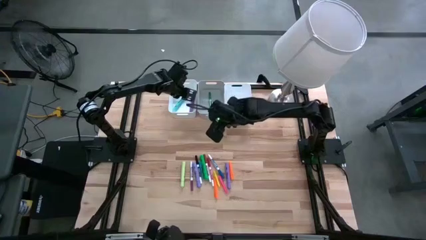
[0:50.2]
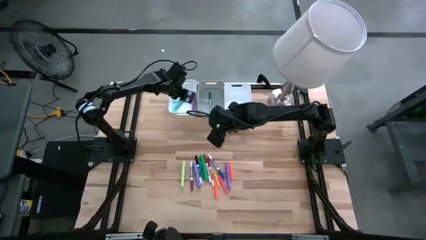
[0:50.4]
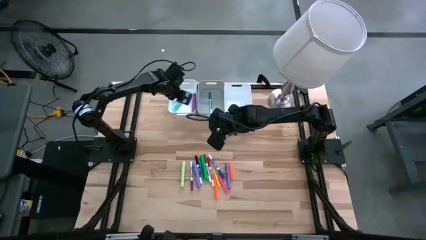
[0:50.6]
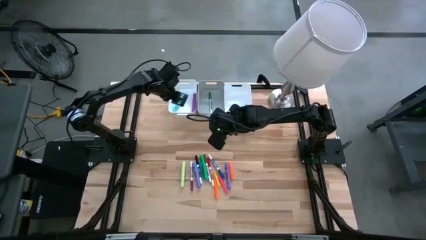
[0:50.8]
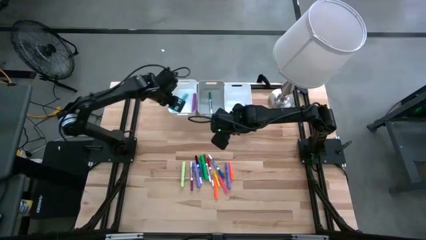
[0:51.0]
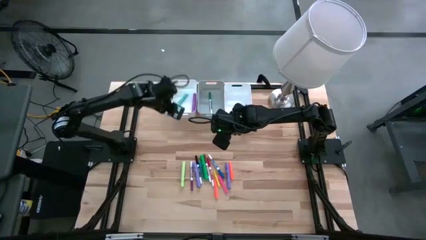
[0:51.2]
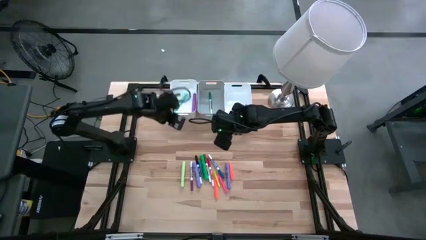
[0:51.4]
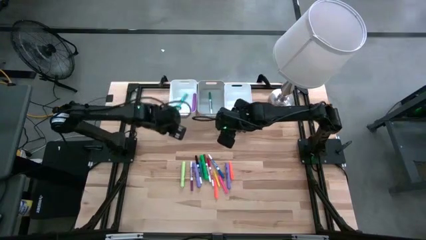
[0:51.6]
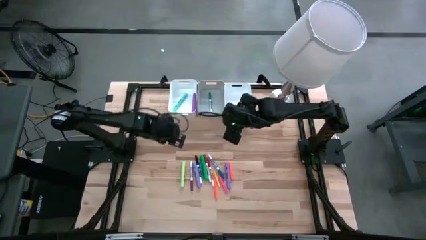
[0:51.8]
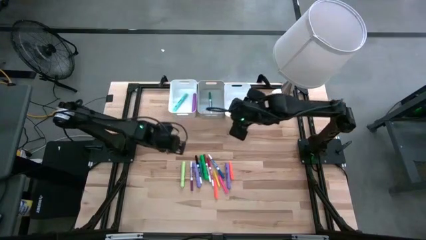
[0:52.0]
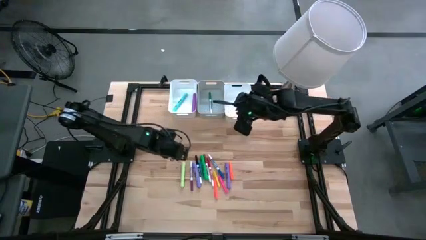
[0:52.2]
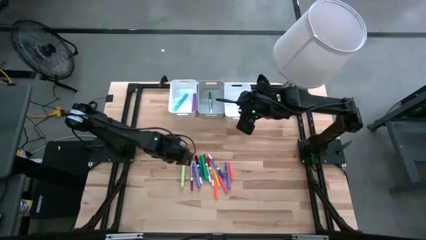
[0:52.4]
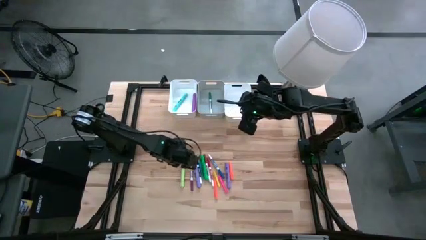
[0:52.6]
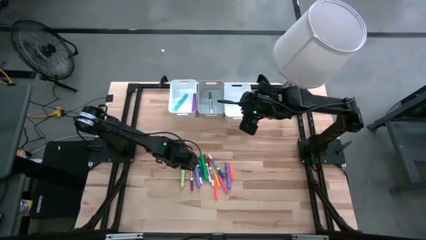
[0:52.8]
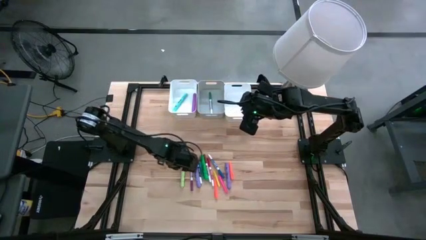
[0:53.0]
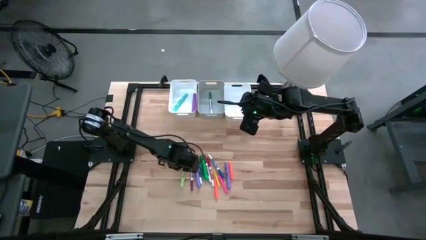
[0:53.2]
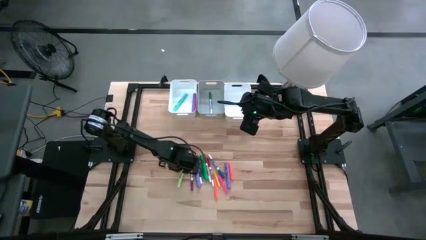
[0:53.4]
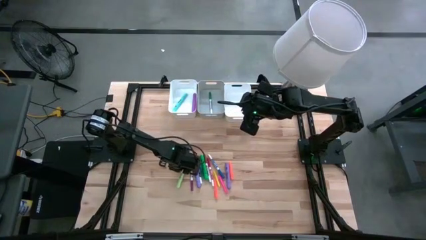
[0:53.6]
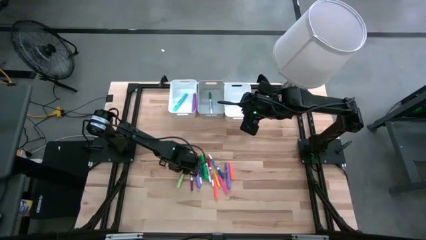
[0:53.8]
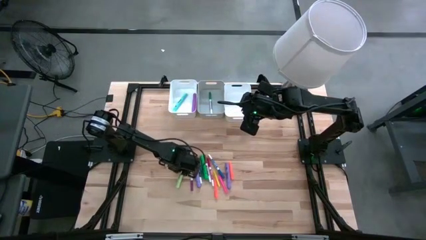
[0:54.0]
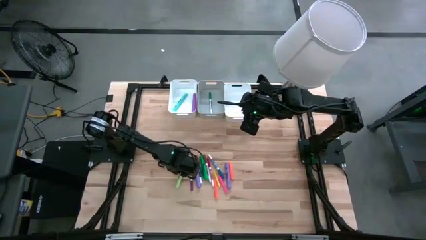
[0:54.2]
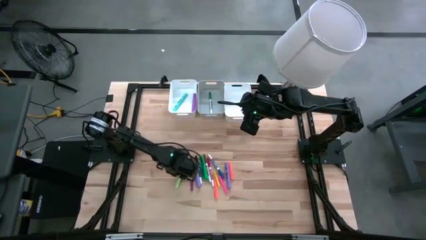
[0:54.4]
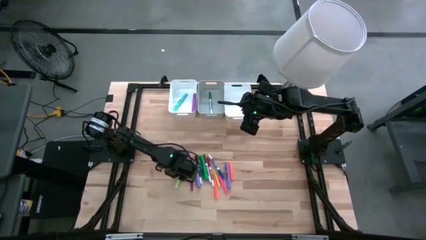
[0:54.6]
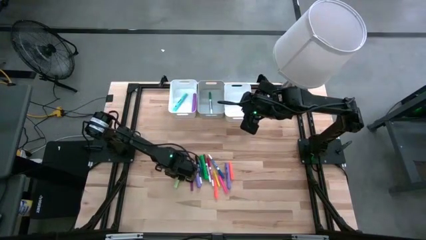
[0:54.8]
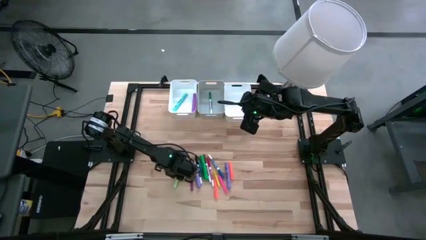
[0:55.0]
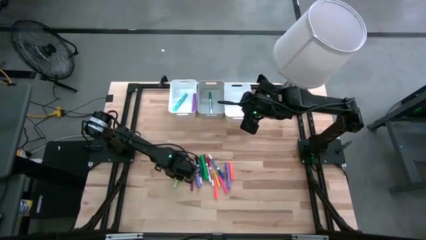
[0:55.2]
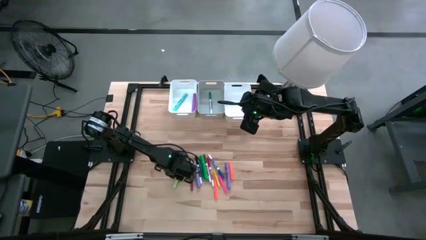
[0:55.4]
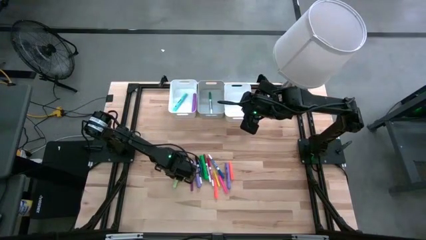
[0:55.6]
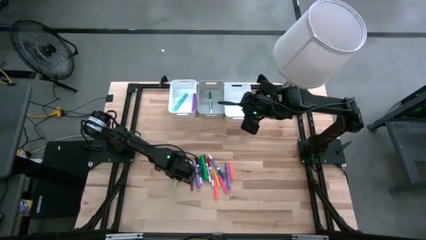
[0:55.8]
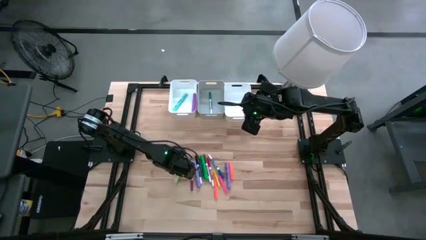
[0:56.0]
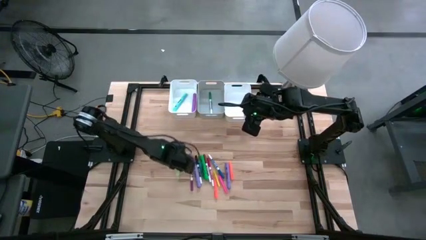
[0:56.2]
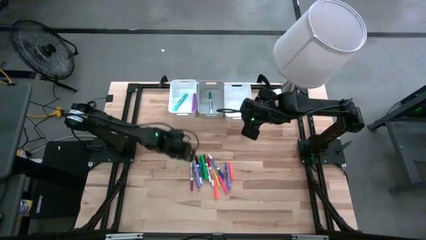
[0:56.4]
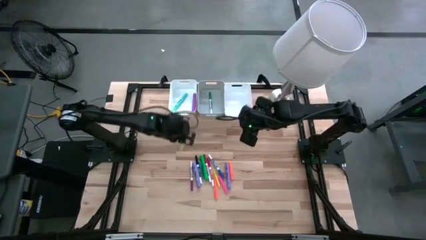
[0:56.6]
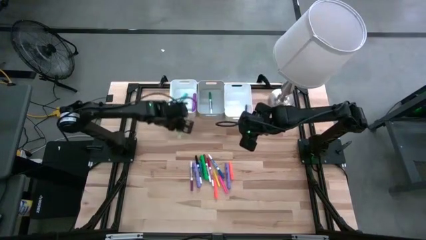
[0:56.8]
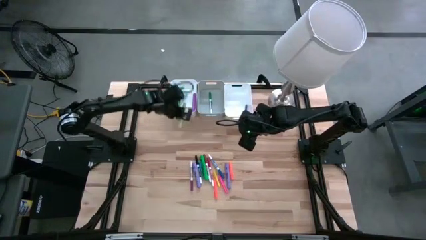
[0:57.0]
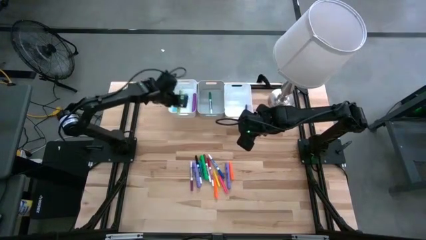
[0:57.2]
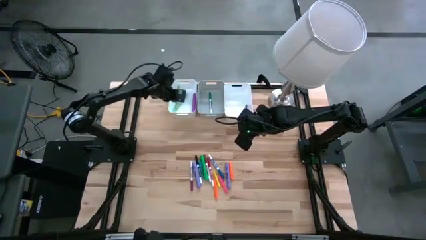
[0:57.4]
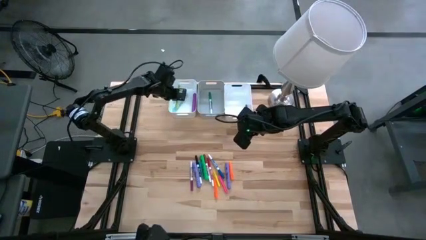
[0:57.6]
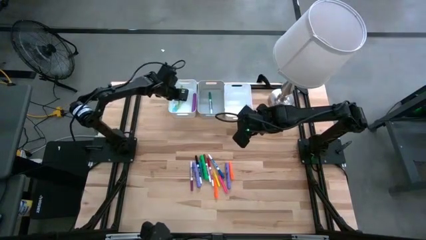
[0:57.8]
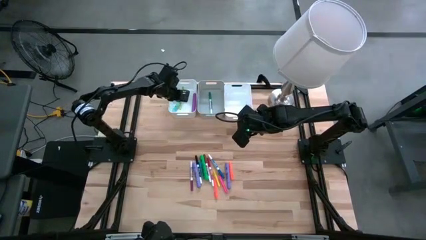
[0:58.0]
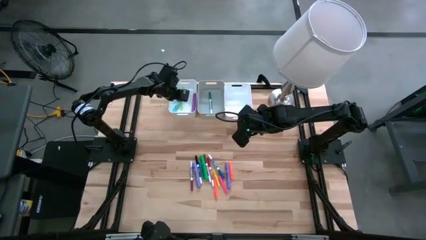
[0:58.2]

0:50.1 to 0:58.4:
Task: Pick & Place Markers
Put the light green highlighter pen into the left white bin

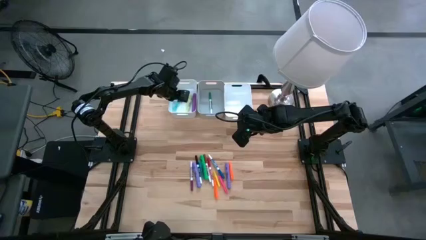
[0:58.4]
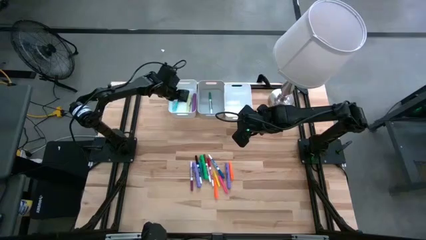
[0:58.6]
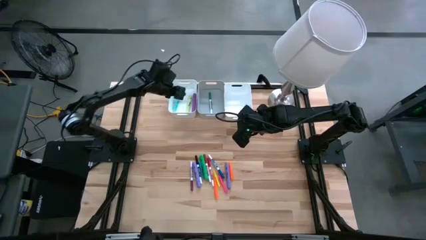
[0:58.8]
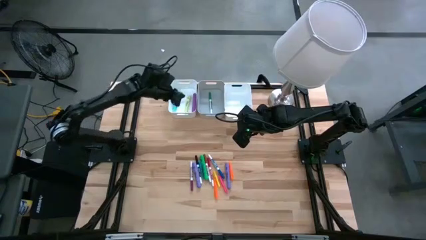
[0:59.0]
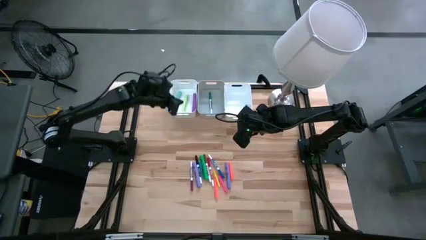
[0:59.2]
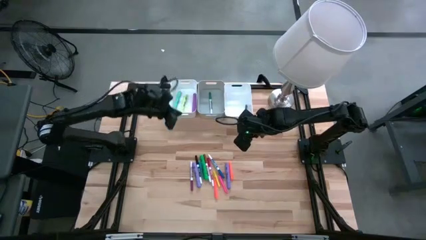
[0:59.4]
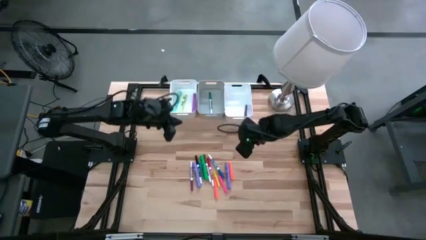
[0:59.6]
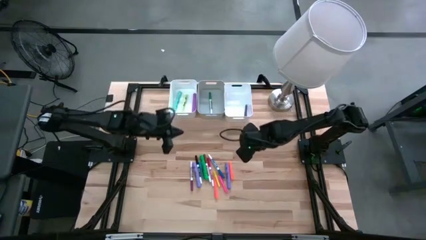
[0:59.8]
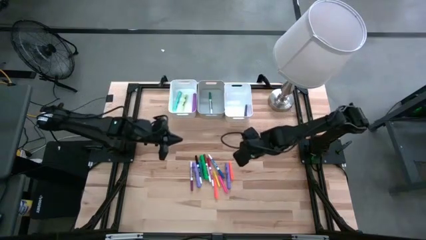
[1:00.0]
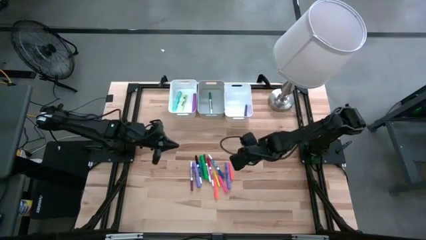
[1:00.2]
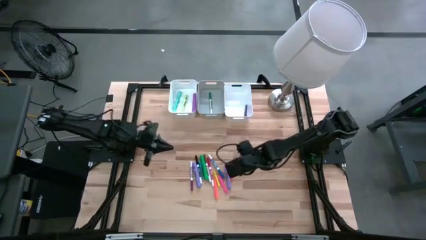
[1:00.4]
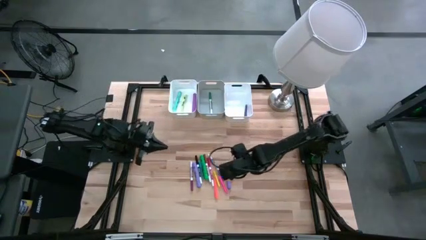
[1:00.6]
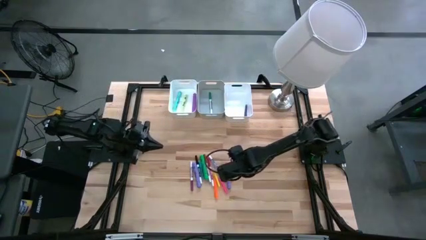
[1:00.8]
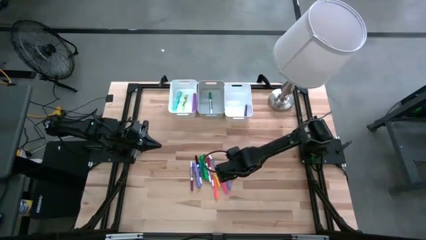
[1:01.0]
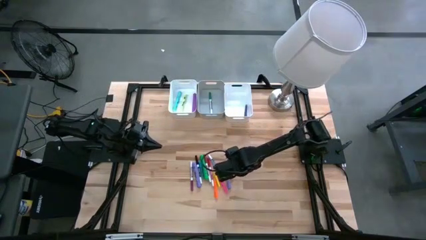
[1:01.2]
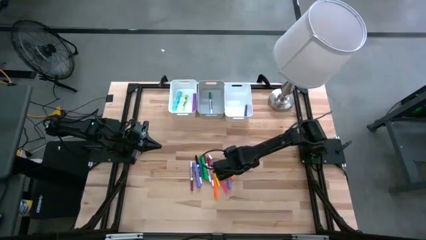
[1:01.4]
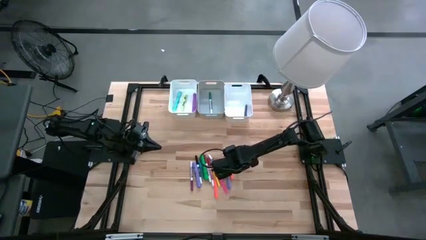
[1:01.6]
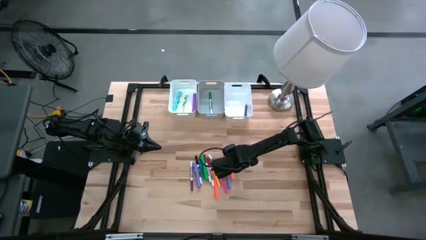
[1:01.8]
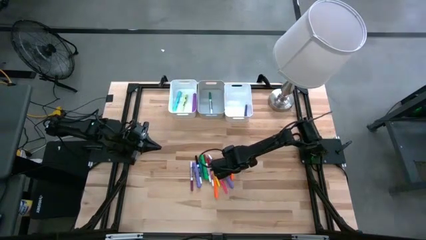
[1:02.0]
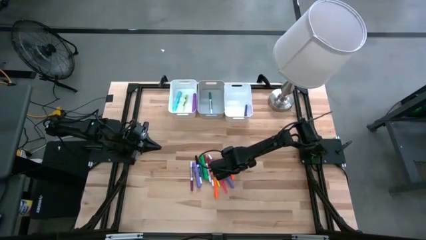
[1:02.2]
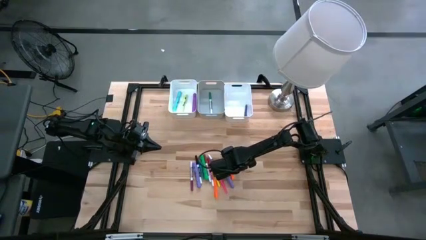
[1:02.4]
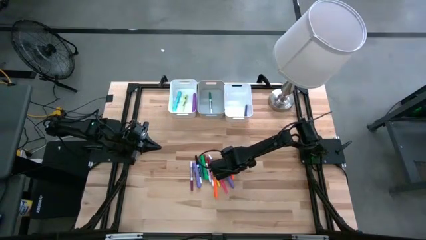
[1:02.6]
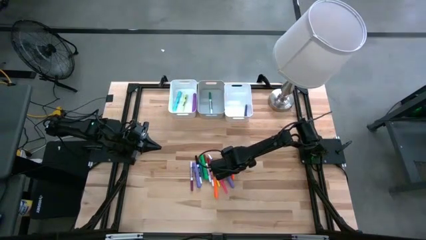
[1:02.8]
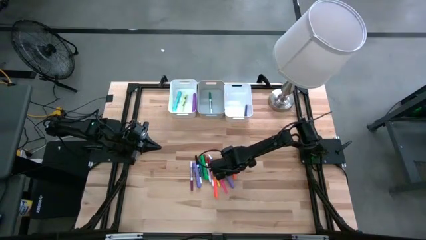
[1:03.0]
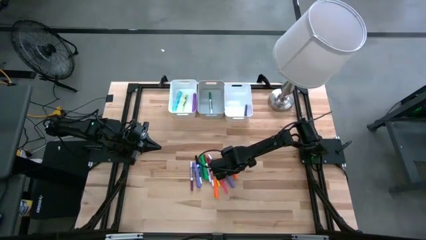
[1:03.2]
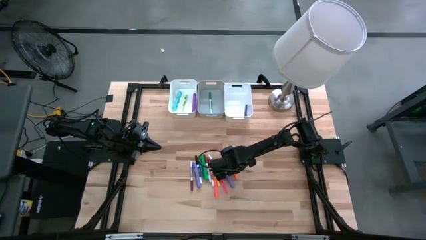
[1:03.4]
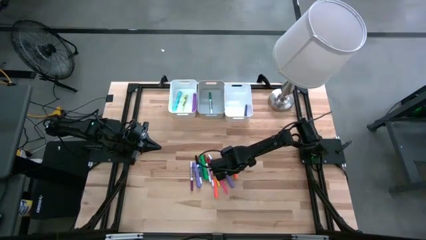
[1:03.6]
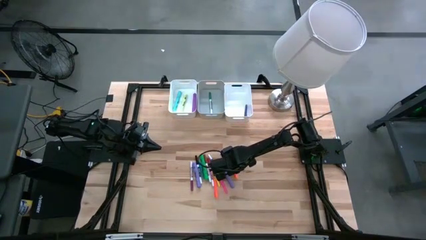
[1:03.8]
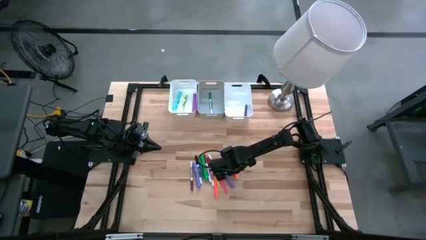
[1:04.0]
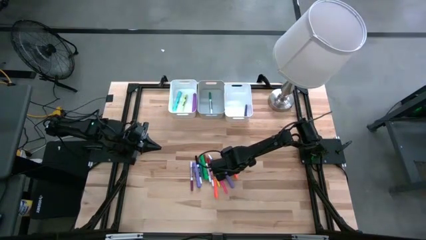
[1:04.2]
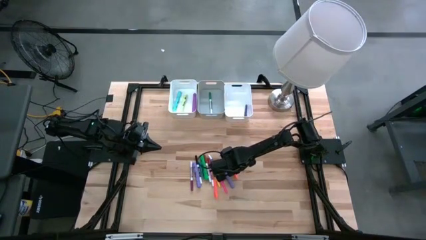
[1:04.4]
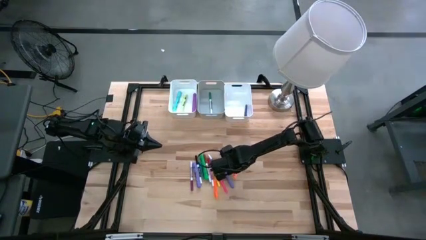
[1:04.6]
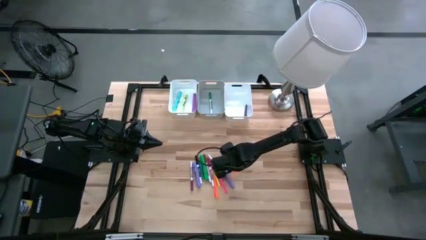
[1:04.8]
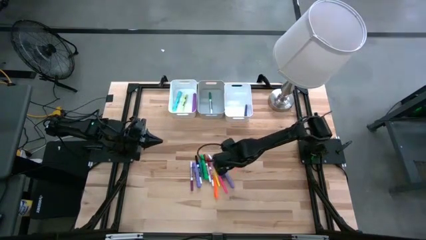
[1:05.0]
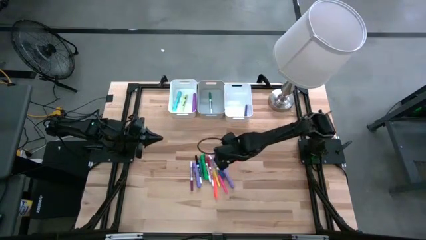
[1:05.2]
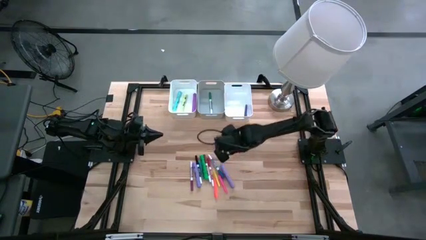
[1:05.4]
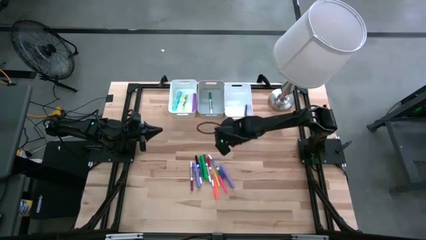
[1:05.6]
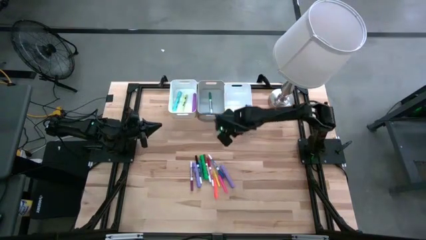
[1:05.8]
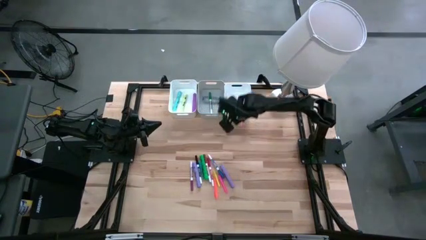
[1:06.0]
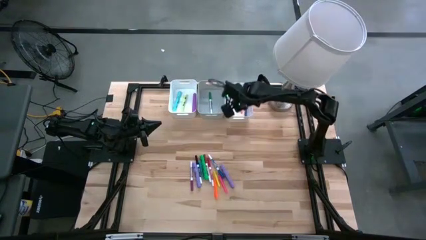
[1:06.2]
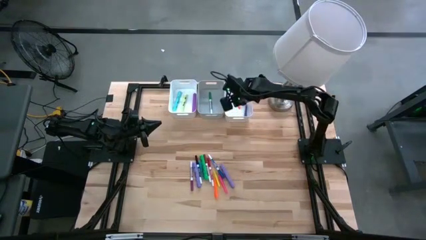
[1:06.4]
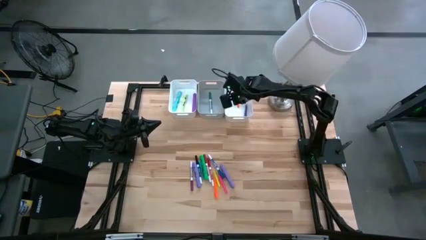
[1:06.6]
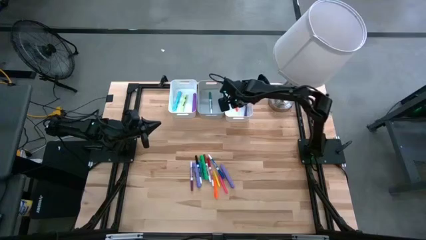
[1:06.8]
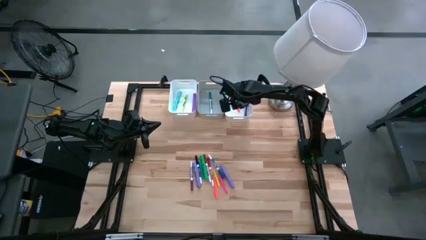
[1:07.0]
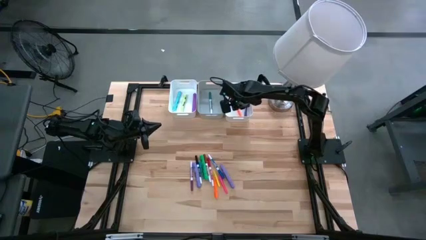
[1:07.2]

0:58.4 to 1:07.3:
Put the right orange pen into the right white bin
